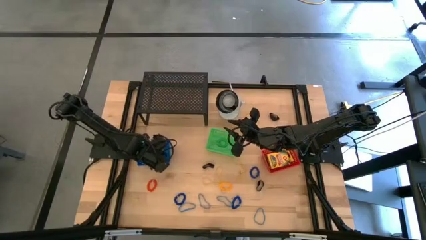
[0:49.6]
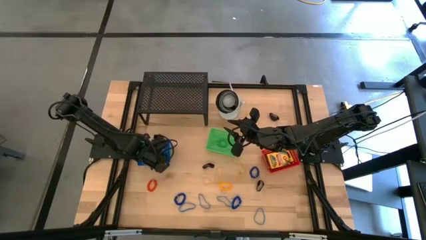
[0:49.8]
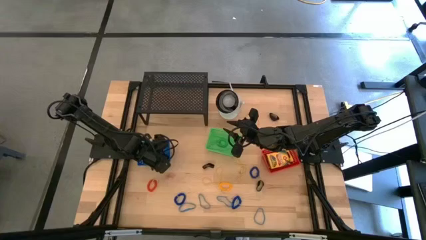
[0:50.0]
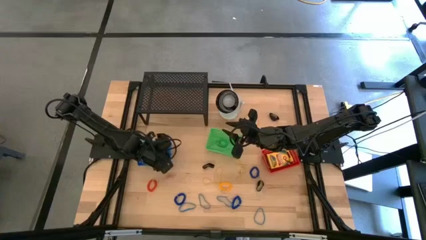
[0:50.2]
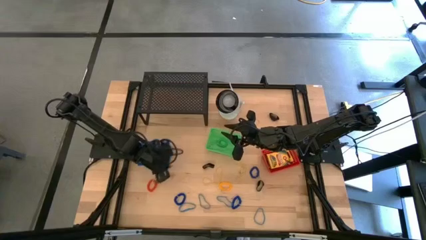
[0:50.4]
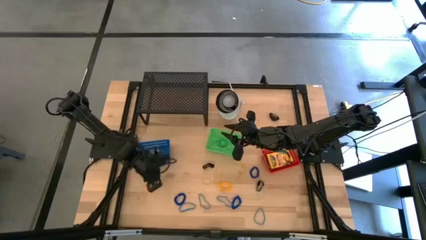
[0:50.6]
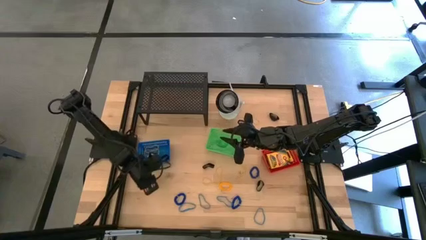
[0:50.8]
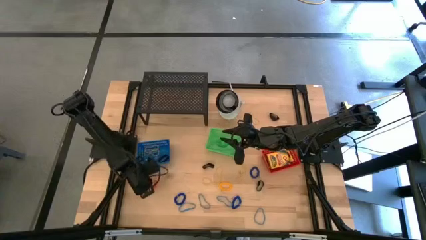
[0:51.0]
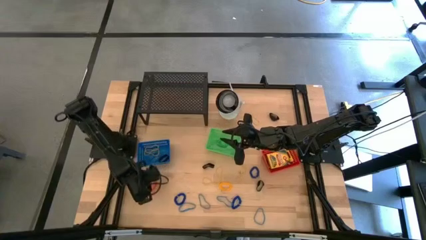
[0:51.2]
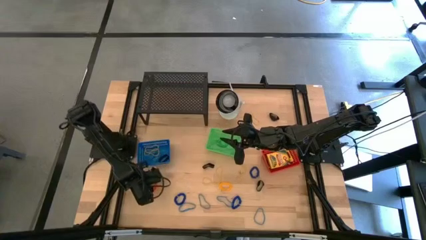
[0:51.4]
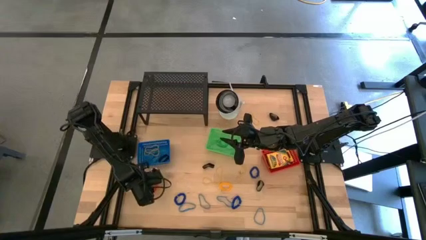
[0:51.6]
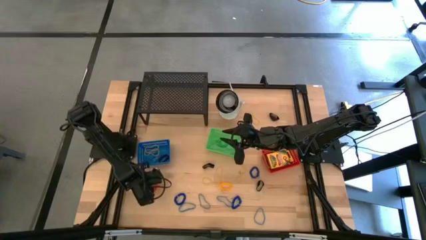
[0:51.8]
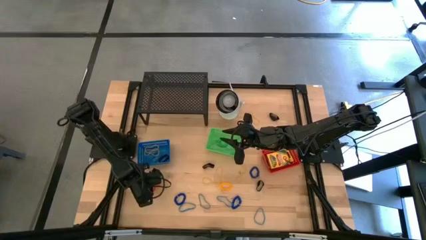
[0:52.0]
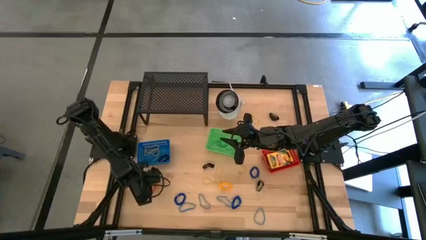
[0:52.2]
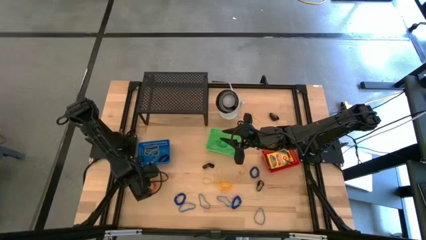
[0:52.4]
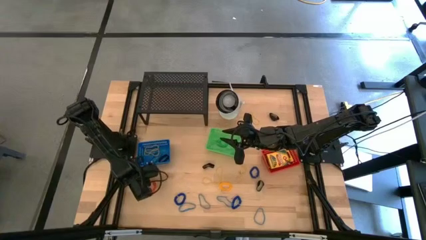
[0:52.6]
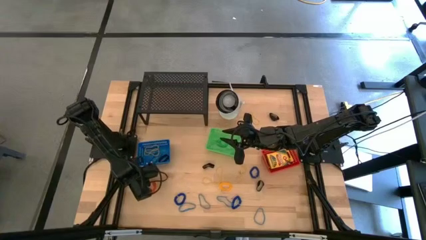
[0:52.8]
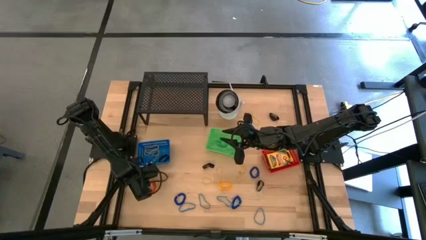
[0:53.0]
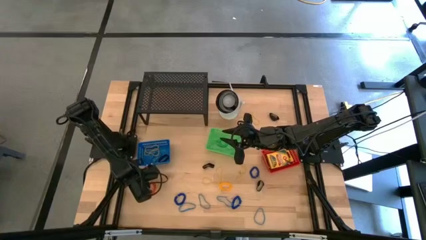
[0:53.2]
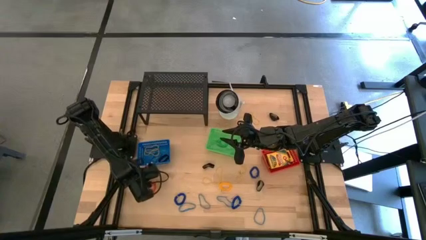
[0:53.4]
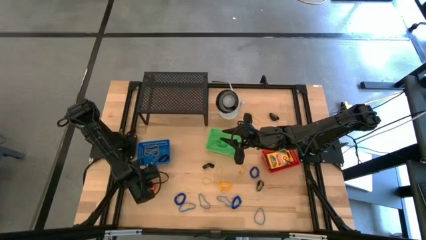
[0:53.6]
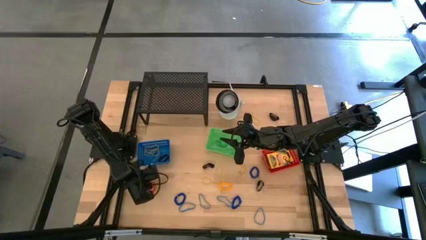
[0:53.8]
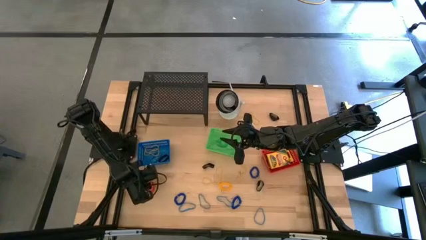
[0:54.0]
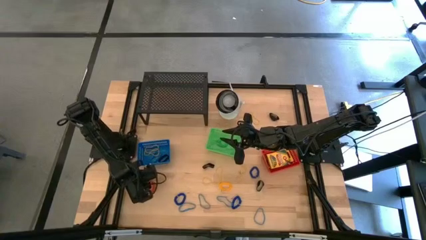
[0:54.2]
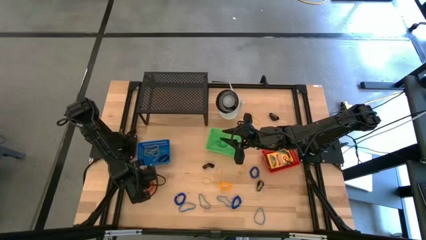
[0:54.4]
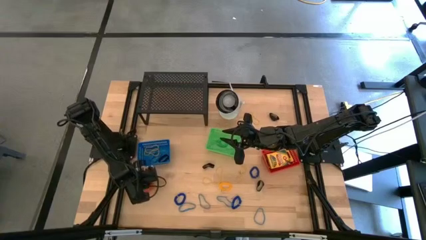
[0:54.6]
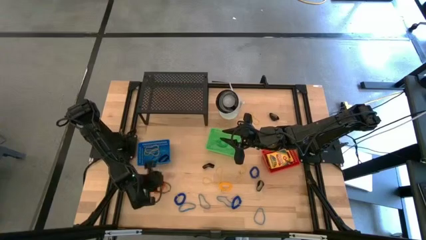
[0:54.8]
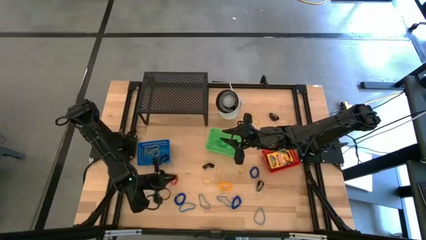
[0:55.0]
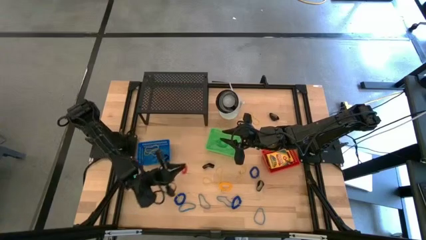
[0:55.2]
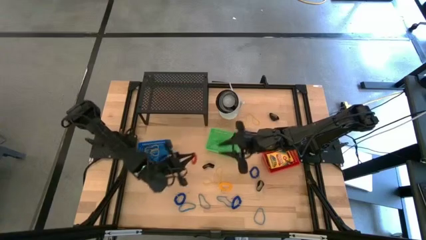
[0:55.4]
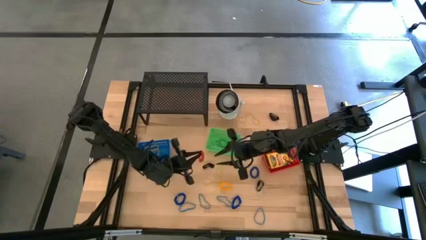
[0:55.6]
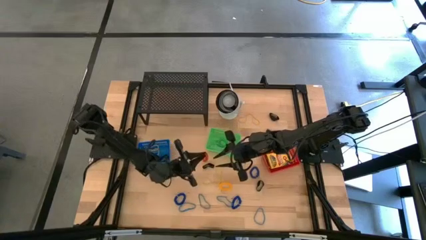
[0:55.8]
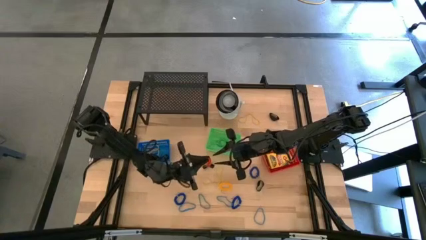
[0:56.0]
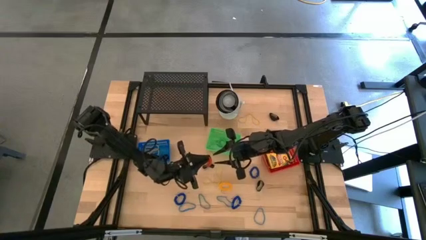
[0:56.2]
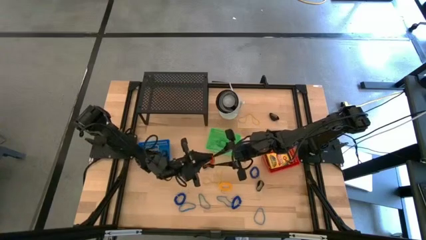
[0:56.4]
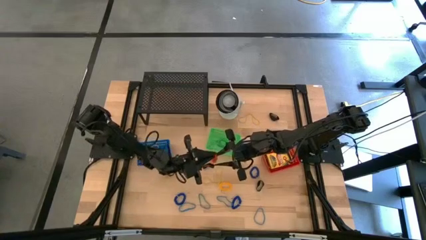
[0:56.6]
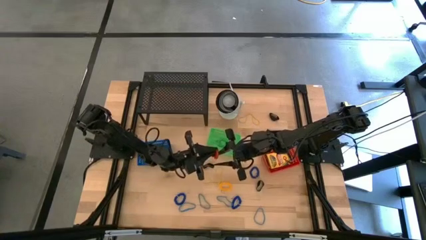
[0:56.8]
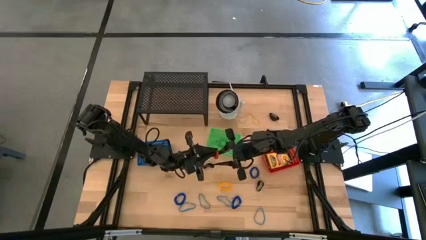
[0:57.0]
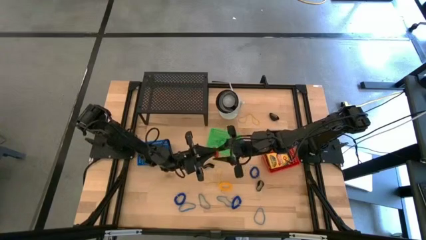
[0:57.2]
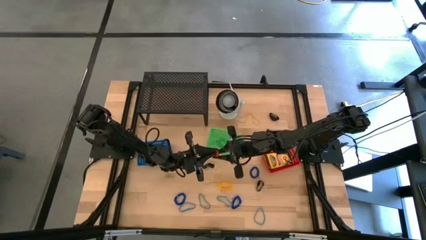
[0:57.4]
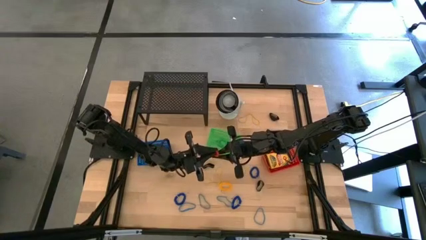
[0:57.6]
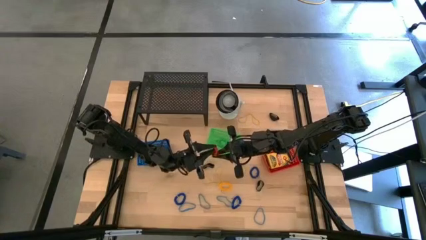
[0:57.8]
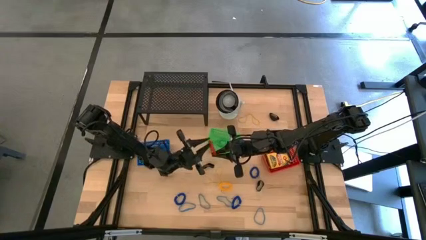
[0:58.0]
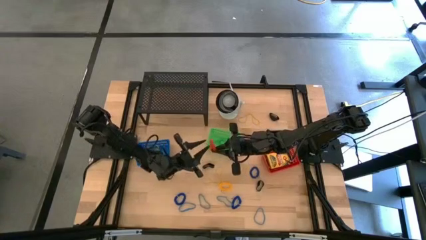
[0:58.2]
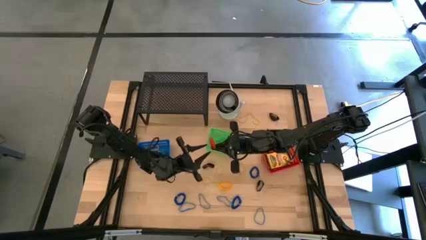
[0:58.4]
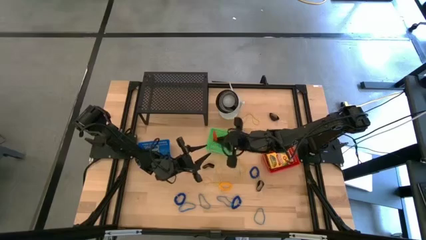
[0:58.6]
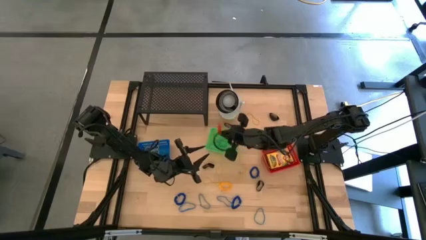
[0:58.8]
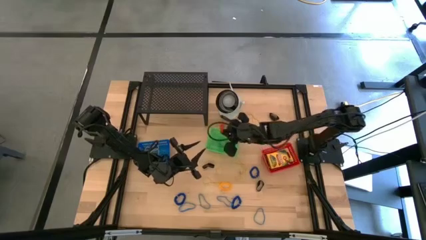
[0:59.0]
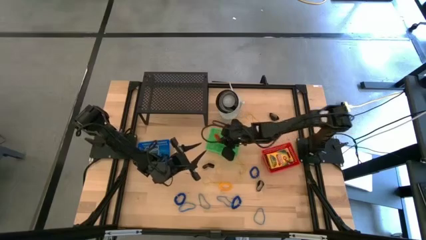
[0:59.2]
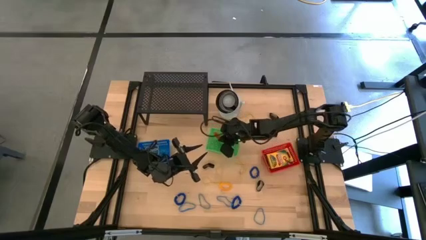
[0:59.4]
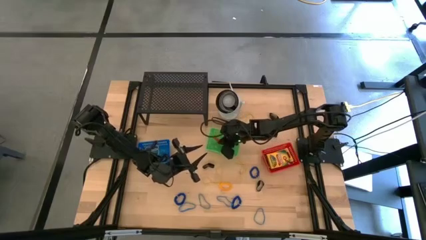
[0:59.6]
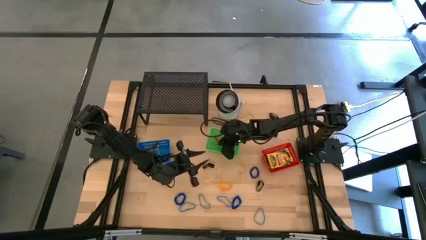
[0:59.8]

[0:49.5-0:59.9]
Task: Pick & Place Office Desk Supplies
Put the red spring keychain into the green bin

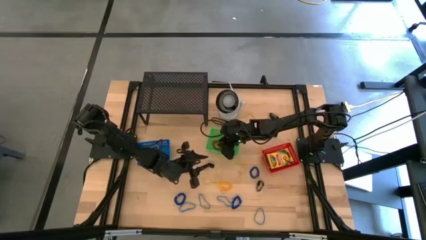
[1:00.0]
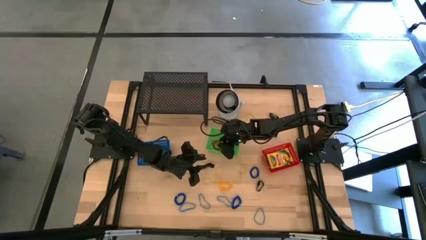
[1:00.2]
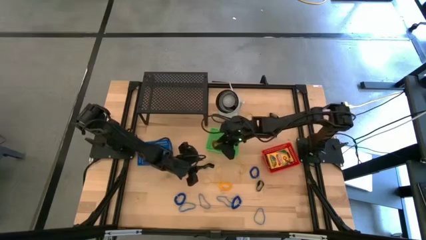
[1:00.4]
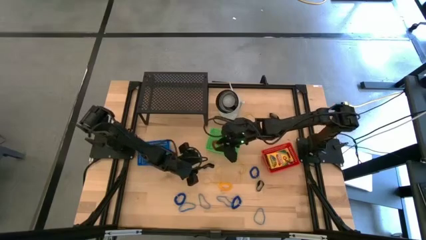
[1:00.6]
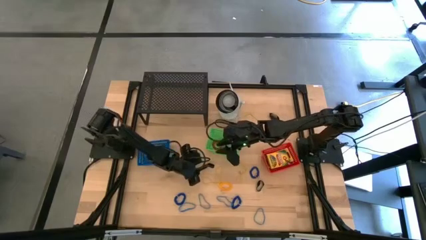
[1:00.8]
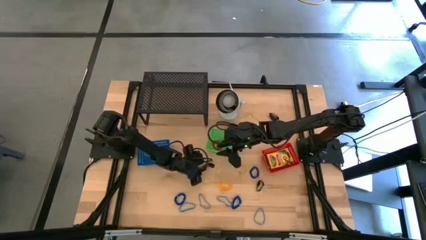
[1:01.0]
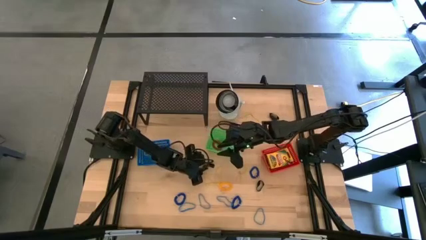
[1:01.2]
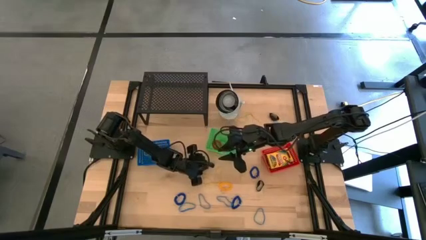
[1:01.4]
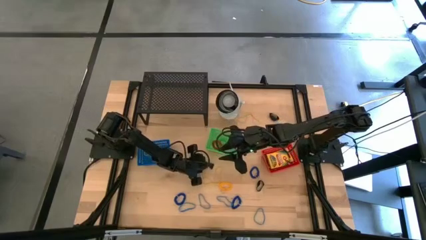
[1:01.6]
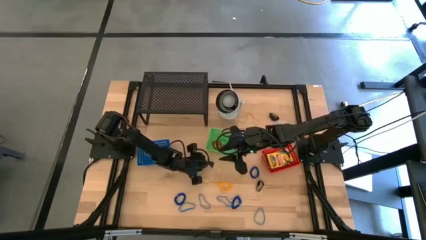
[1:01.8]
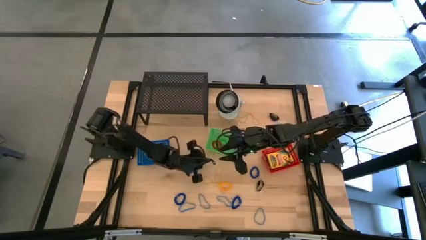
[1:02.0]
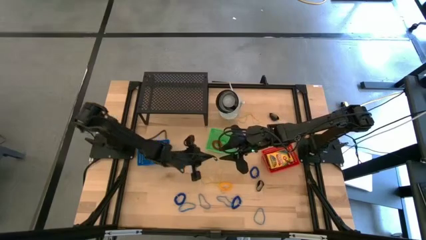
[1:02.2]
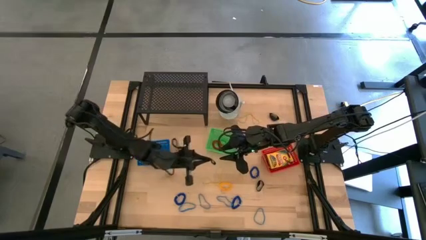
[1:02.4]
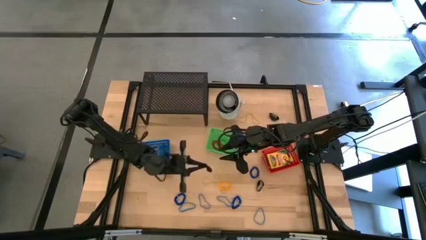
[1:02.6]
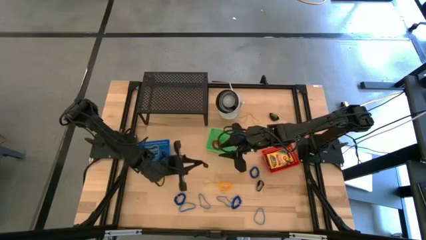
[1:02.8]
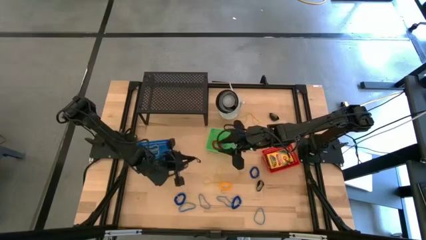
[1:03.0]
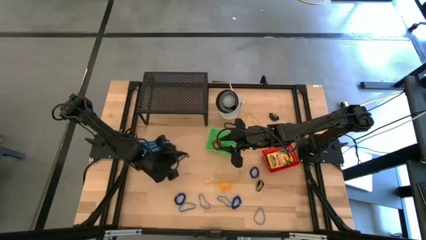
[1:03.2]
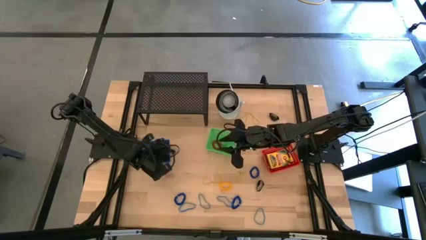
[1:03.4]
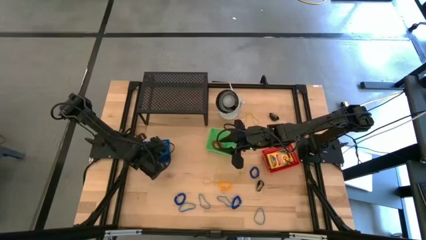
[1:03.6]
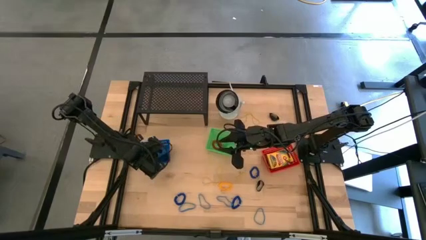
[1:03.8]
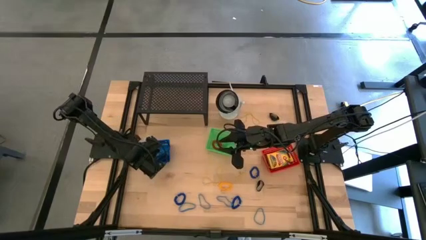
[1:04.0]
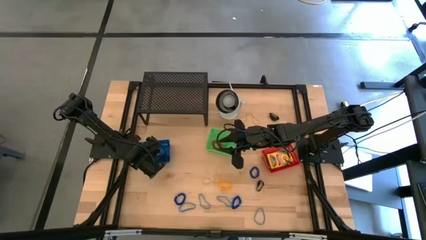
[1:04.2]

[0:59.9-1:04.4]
Put the black rubber band into the blue bin
